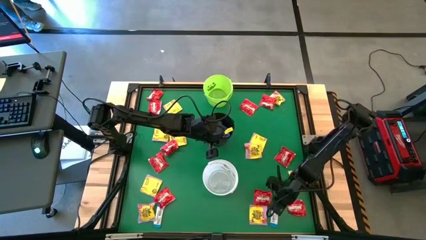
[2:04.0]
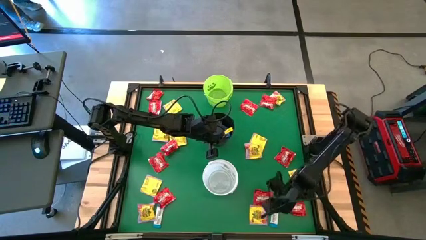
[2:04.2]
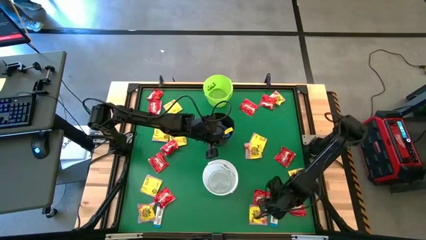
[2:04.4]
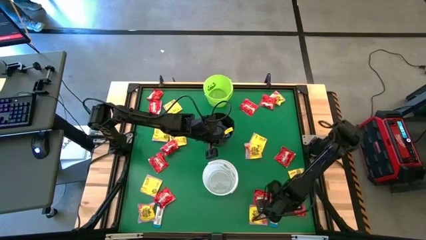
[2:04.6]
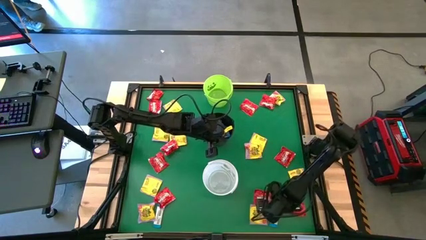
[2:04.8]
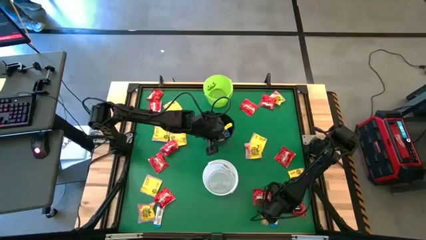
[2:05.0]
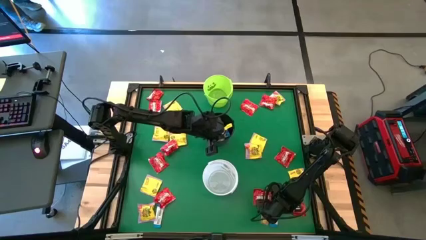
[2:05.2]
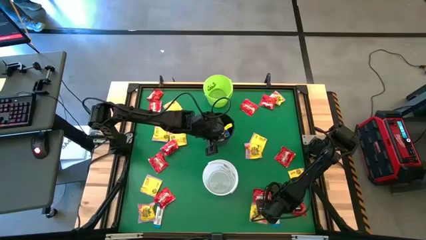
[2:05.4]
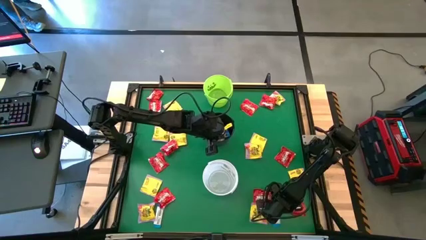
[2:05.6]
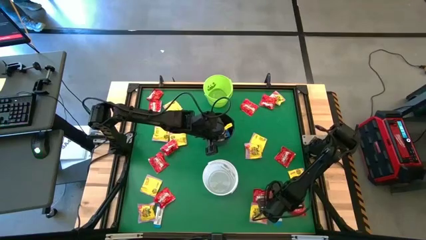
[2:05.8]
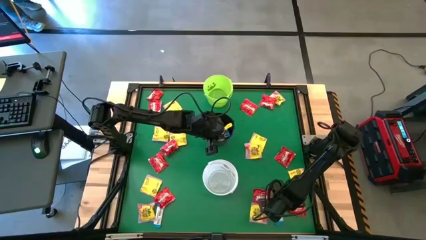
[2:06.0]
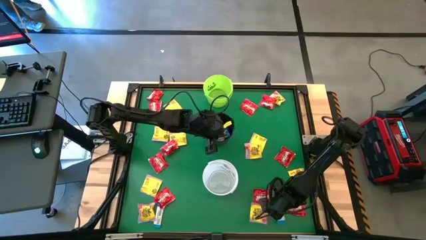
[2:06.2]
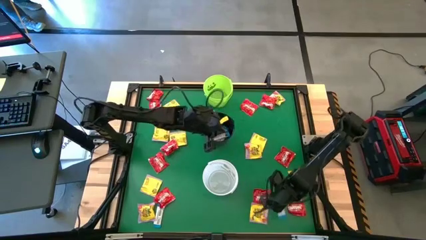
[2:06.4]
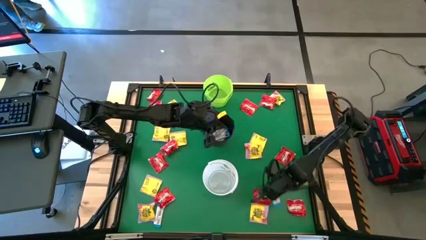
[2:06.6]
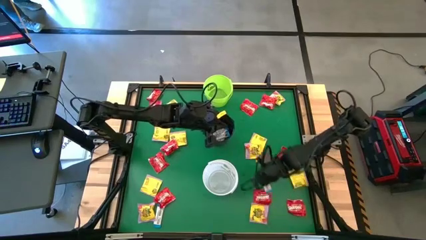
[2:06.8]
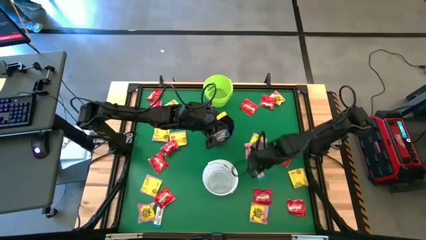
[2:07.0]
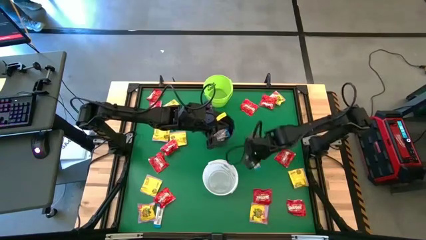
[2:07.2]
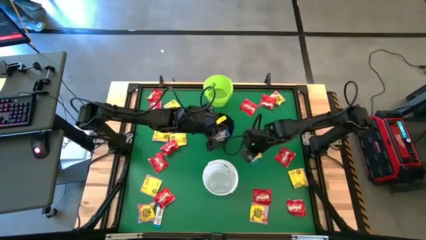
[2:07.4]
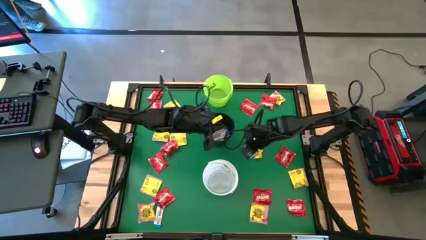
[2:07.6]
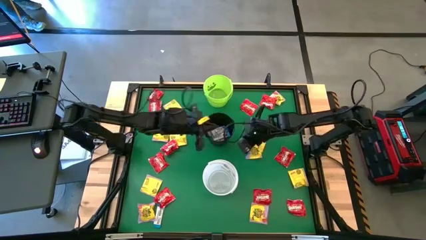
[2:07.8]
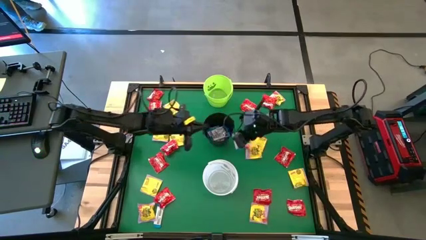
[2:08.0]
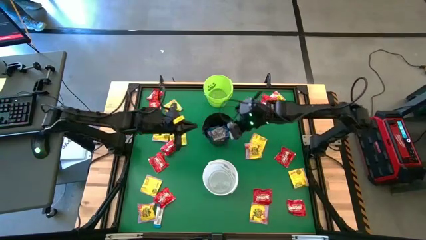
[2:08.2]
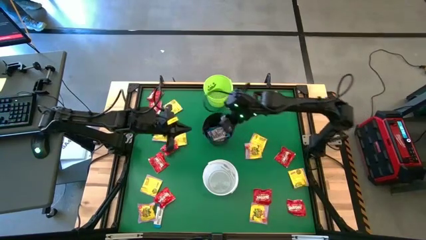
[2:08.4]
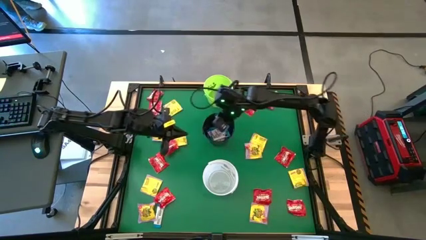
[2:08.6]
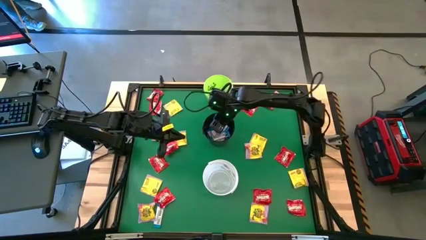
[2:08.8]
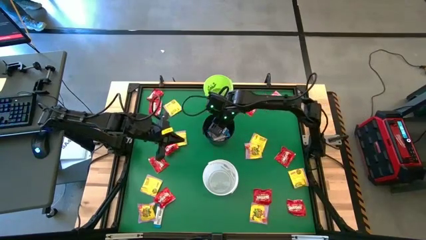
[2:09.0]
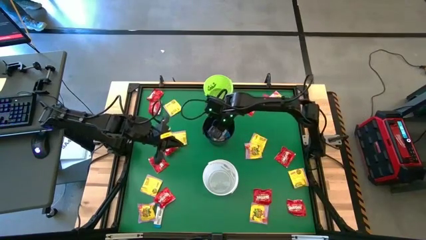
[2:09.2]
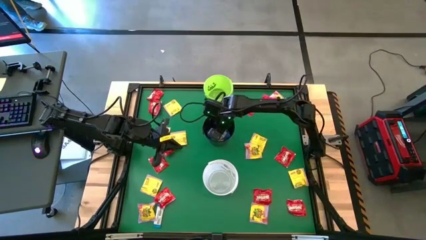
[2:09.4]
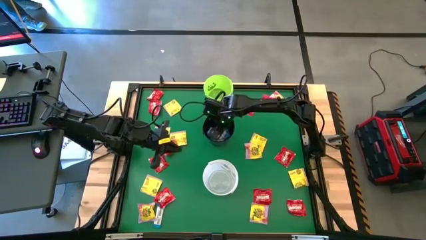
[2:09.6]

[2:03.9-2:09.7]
Task: Sort candy by brand, put in halloween buckets
Put the white chocolate into the black bucket

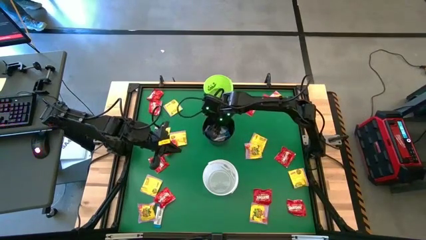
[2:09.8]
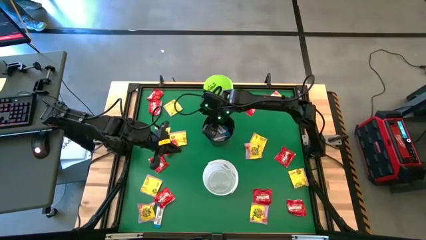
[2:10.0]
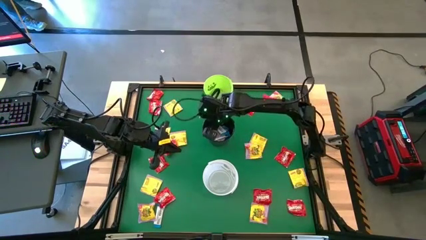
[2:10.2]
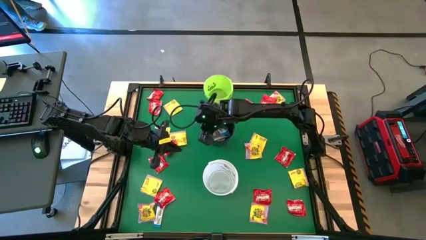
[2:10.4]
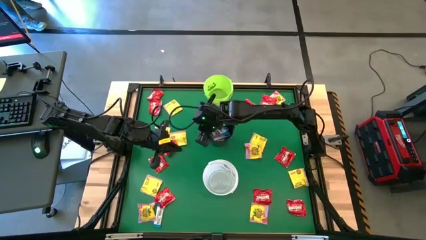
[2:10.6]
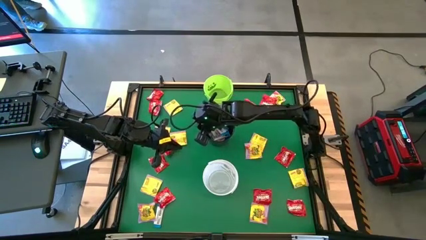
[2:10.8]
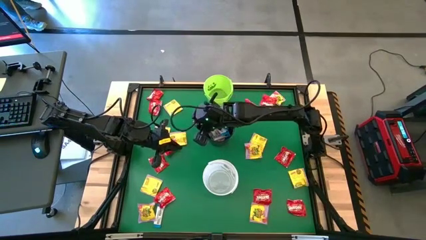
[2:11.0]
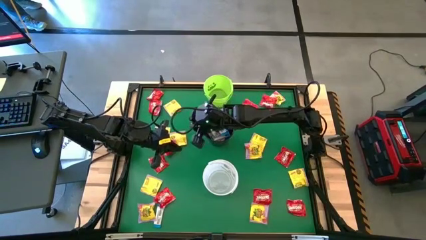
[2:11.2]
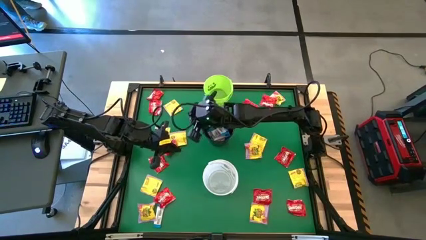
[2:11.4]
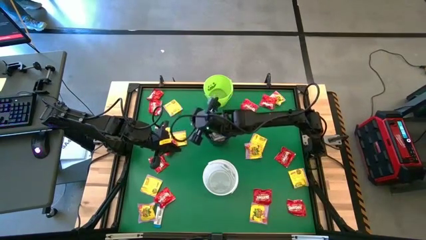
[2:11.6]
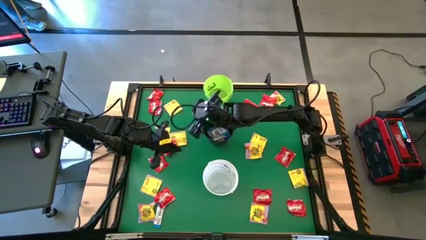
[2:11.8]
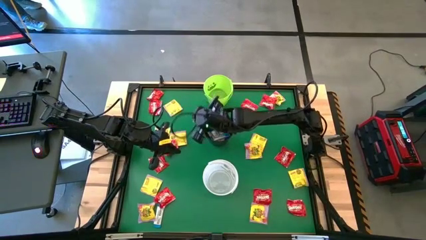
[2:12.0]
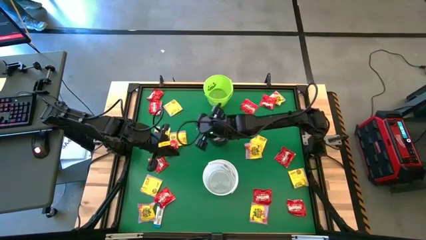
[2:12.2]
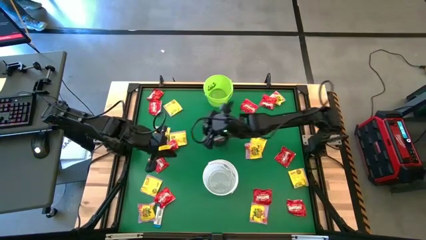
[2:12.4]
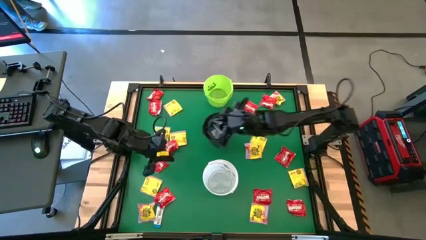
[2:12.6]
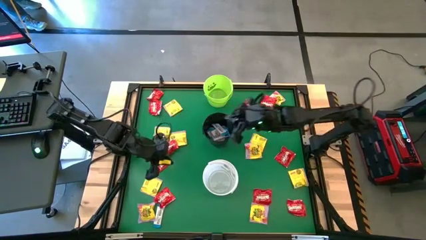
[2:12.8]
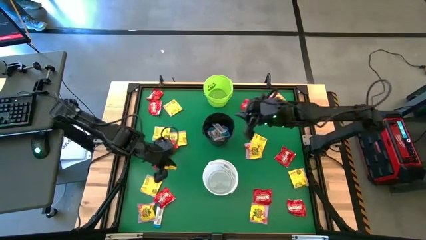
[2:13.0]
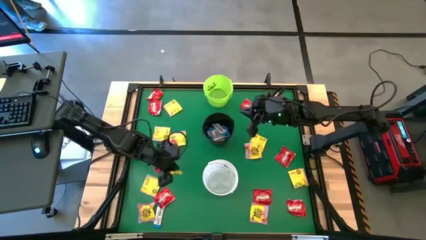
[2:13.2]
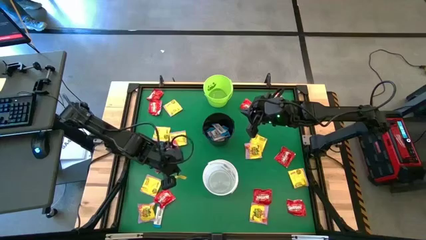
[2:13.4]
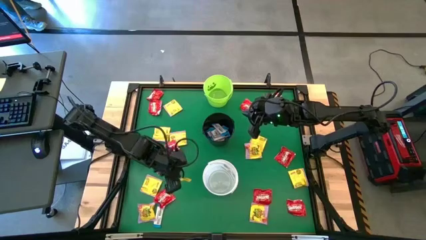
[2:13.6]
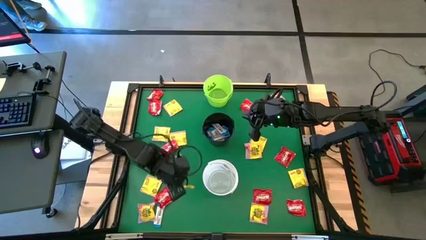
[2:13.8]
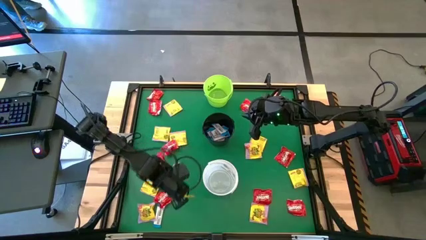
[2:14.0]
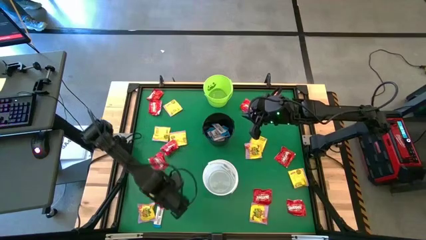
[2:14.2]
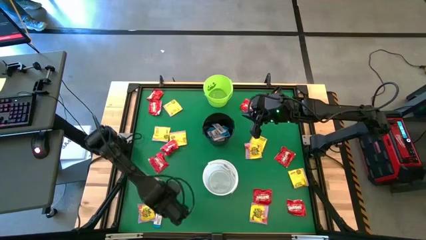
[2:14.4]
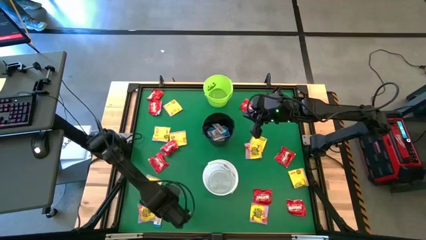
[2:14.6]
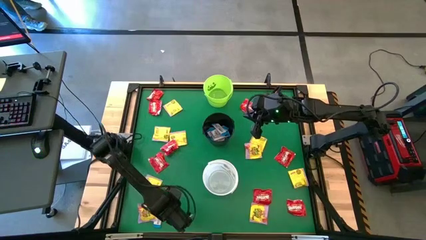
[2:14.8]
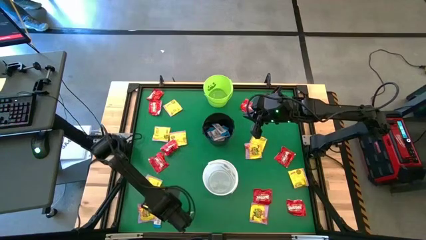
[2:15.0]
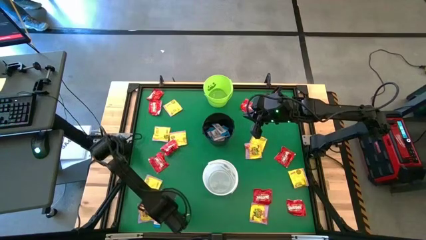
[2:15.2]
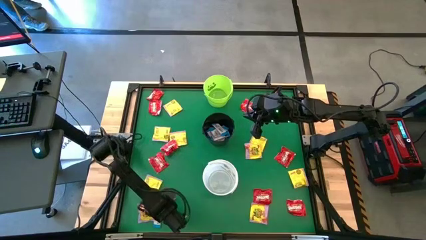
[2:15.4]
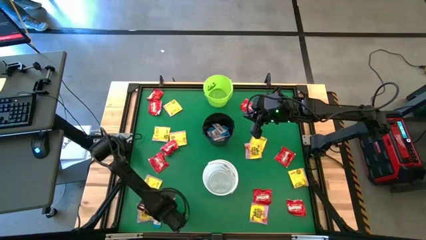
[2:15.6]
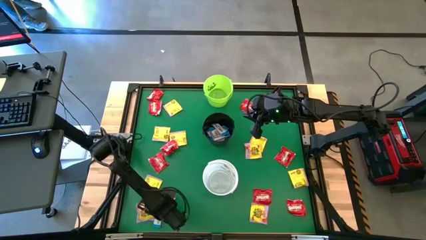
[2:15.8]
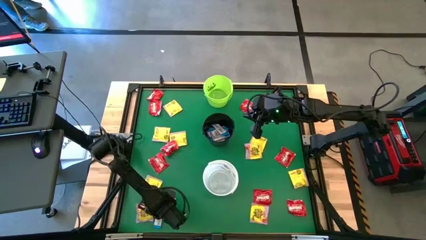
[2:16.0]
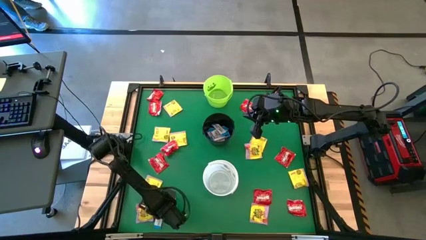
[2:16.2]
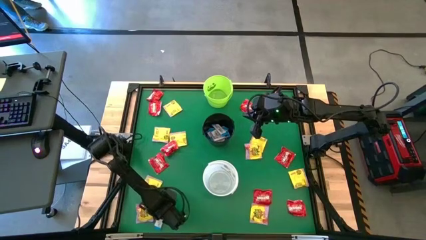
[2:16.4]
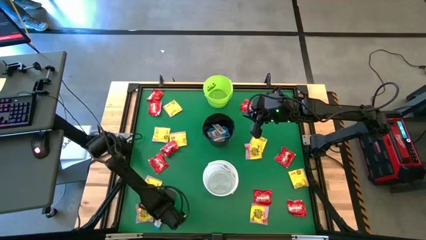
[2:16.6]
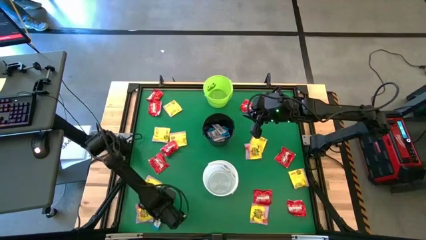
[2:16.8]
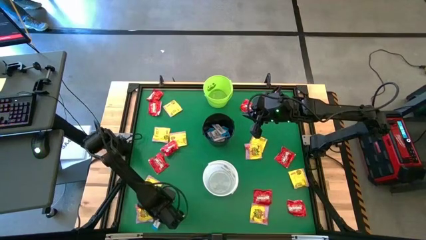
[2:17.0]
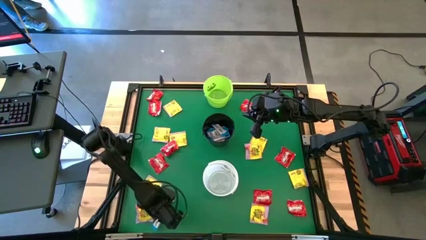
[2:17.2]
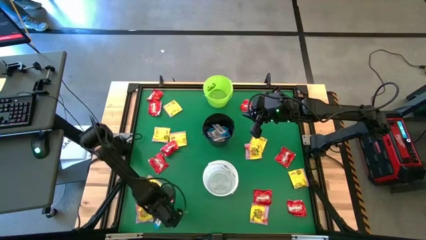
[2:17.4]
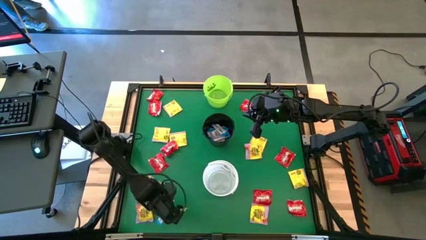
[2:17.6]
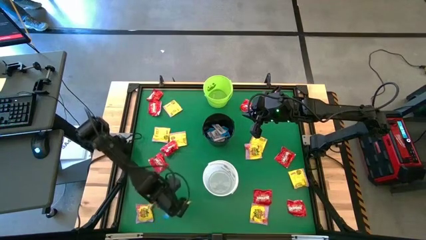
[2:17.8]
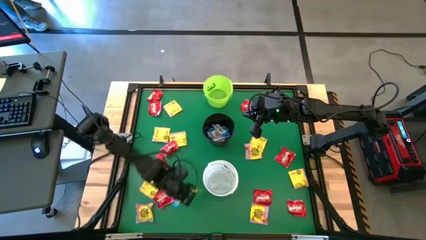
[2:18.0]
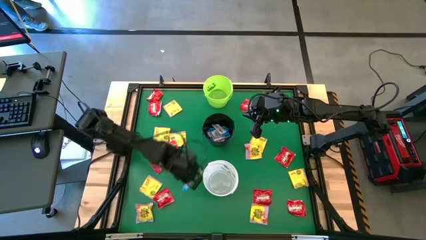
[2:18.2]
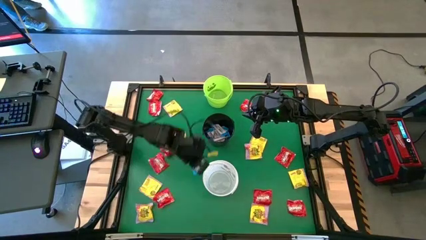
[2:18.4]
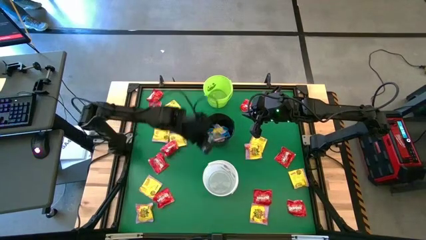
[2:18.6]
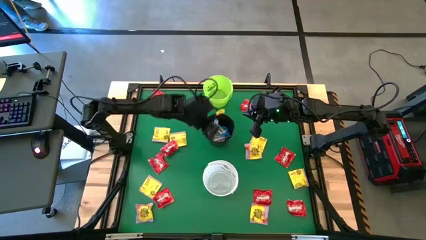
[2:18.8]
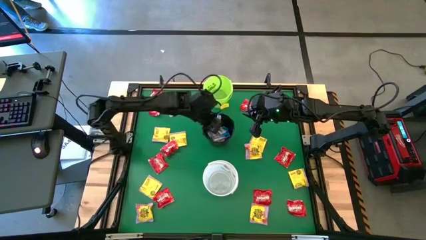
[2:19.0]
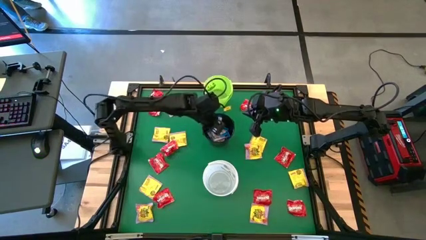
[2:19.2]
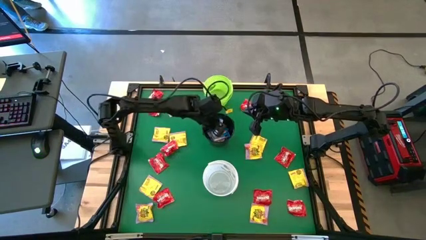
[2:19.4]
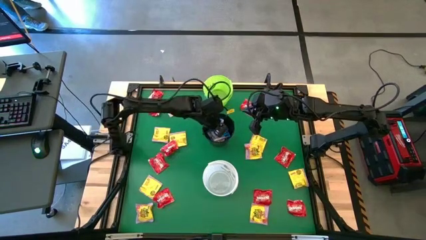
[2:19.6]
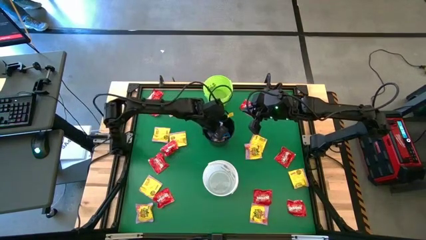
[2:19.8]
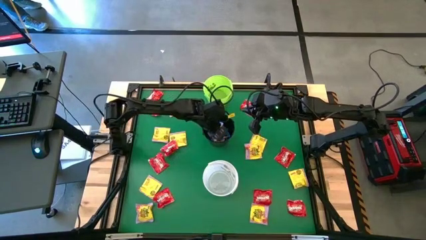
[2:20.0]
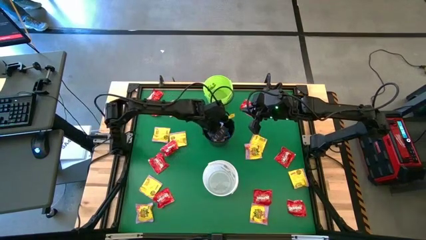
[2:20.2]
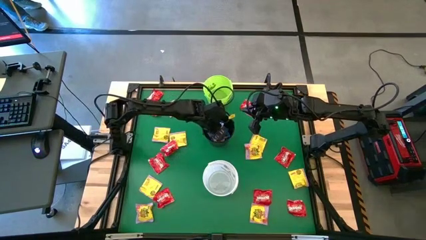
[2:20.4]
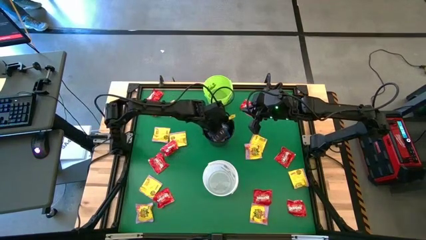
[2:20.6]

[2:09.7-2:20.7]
Put the white chocolate into the black bucket
